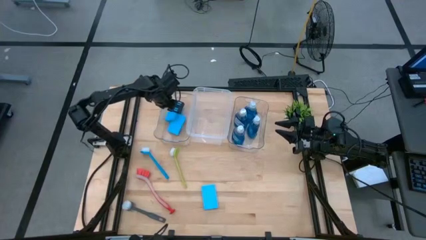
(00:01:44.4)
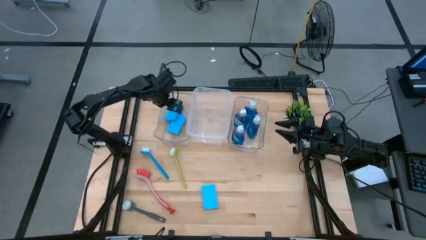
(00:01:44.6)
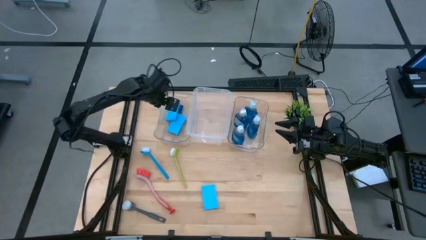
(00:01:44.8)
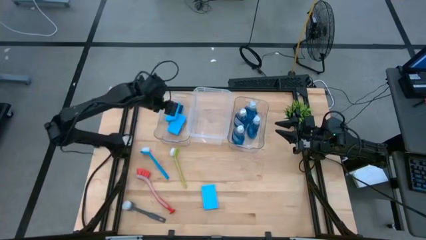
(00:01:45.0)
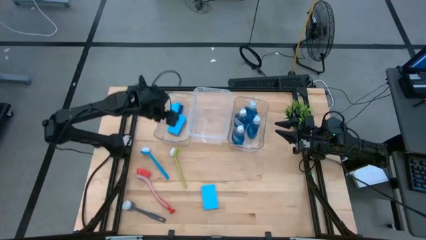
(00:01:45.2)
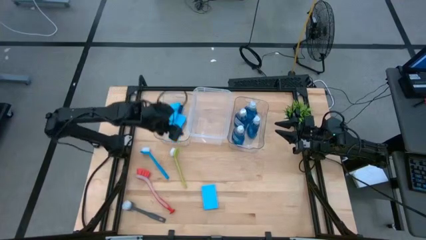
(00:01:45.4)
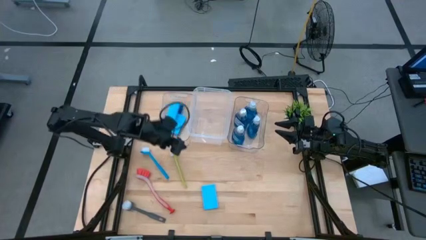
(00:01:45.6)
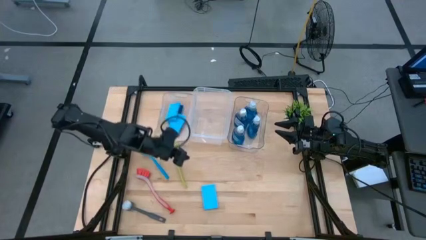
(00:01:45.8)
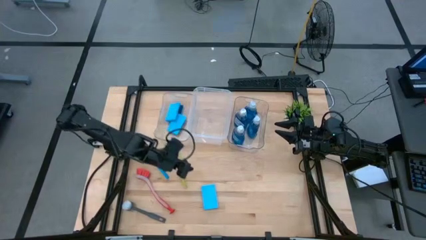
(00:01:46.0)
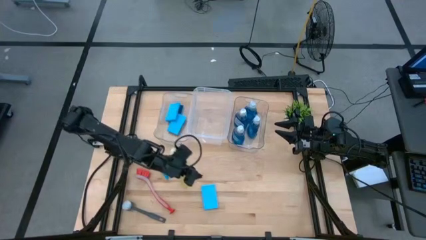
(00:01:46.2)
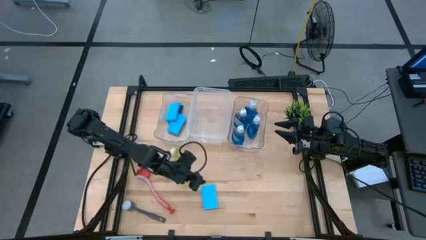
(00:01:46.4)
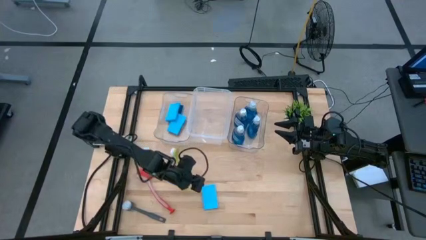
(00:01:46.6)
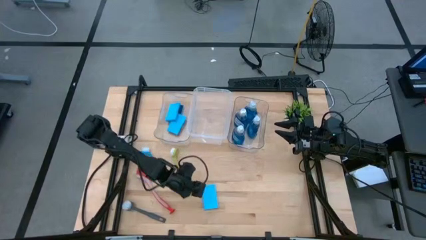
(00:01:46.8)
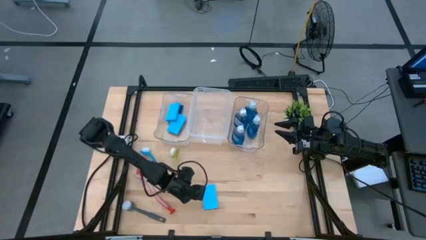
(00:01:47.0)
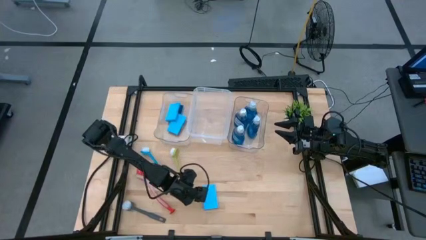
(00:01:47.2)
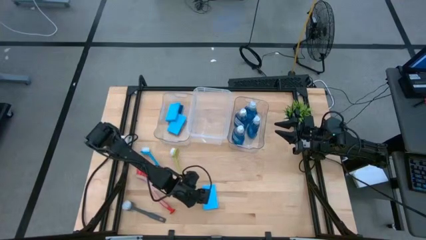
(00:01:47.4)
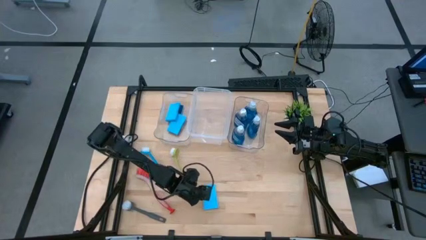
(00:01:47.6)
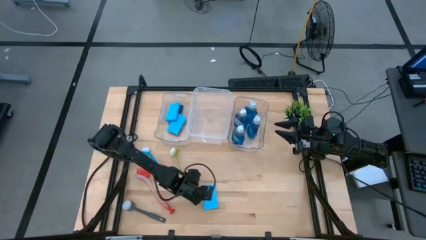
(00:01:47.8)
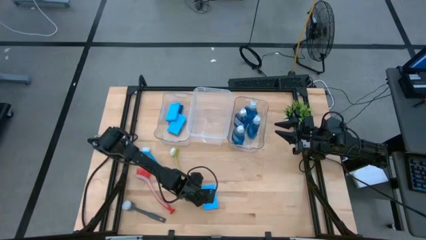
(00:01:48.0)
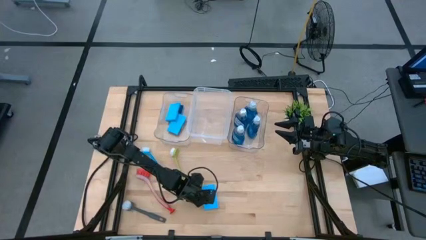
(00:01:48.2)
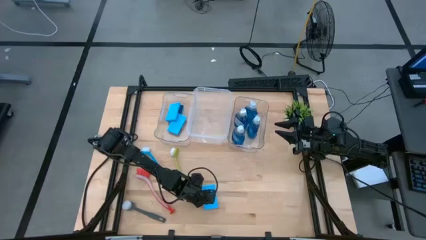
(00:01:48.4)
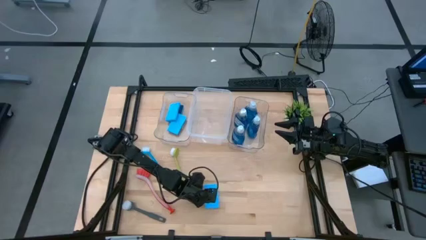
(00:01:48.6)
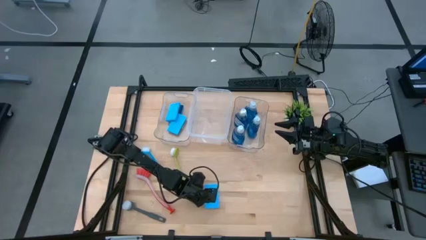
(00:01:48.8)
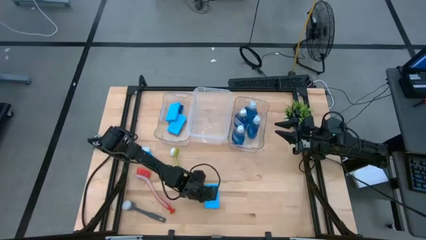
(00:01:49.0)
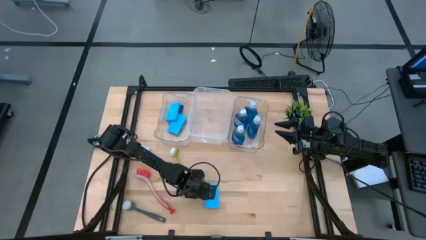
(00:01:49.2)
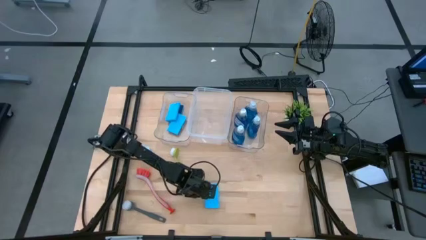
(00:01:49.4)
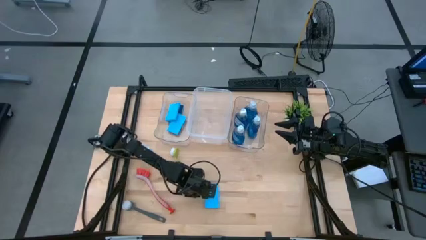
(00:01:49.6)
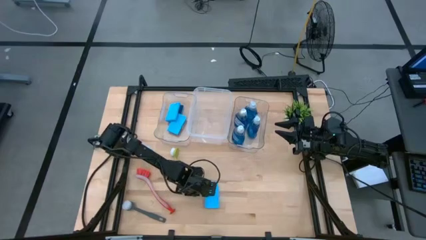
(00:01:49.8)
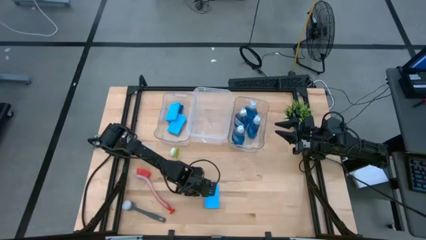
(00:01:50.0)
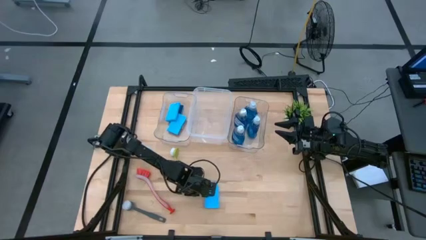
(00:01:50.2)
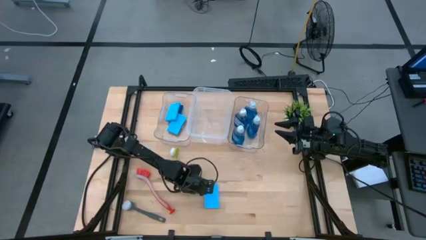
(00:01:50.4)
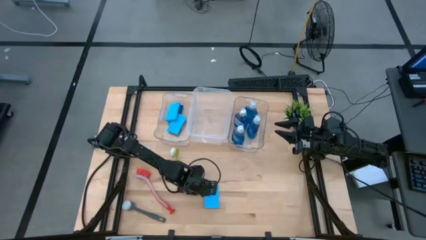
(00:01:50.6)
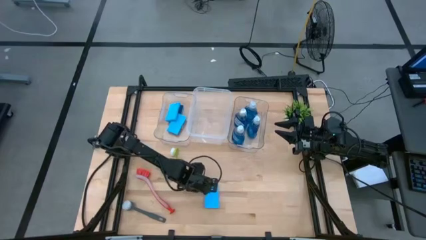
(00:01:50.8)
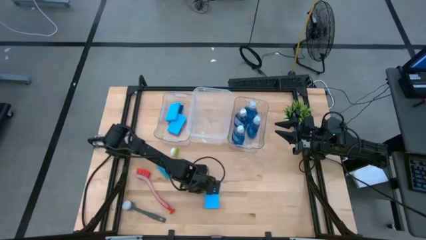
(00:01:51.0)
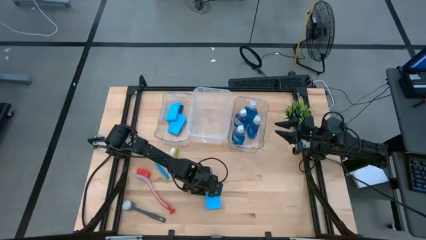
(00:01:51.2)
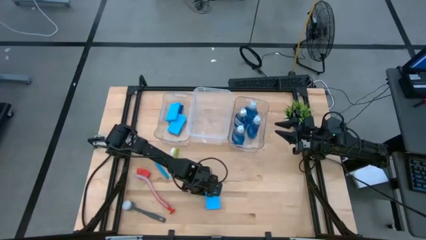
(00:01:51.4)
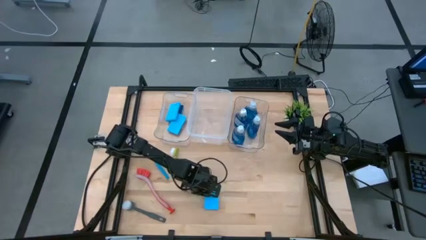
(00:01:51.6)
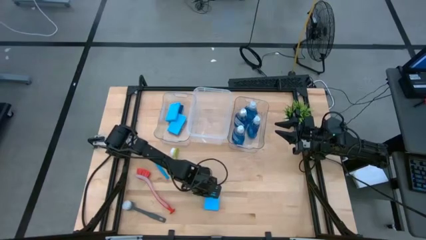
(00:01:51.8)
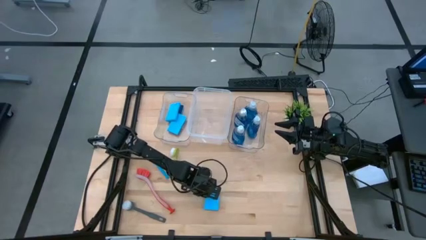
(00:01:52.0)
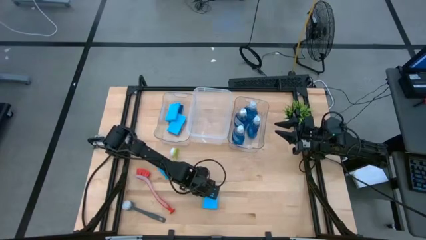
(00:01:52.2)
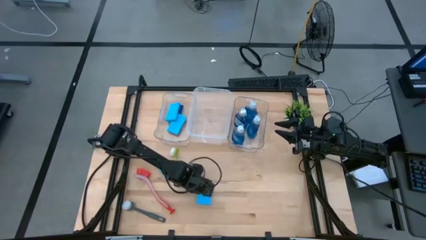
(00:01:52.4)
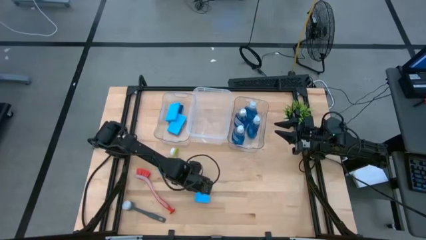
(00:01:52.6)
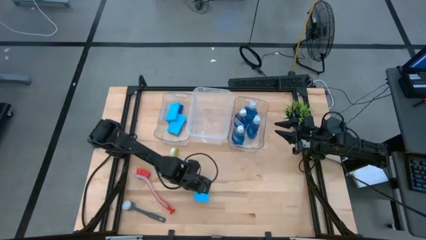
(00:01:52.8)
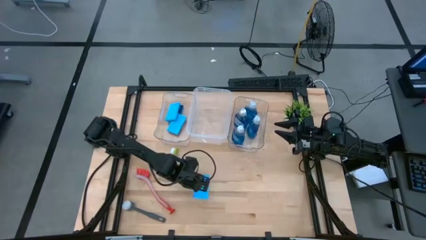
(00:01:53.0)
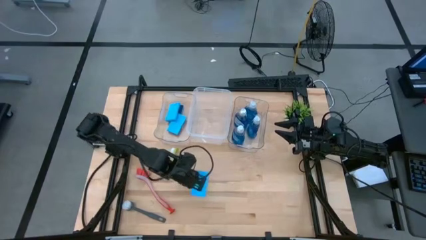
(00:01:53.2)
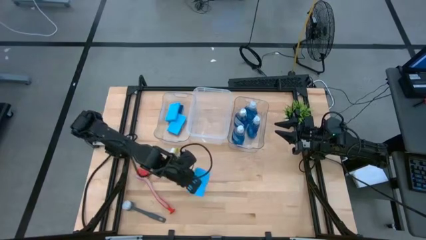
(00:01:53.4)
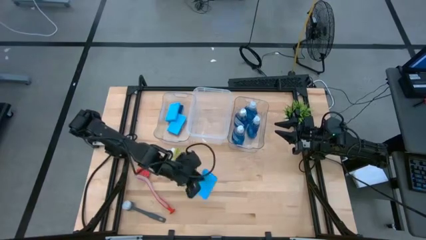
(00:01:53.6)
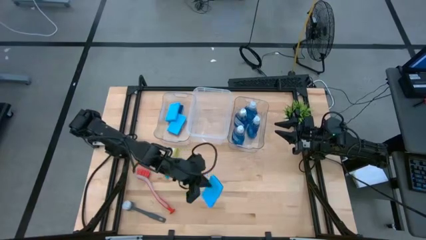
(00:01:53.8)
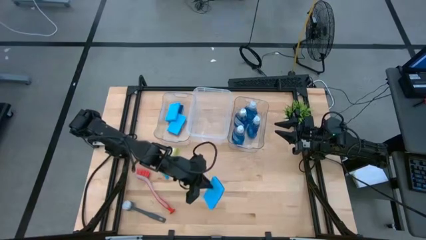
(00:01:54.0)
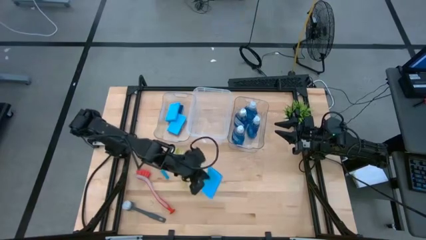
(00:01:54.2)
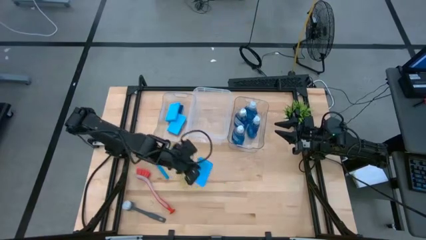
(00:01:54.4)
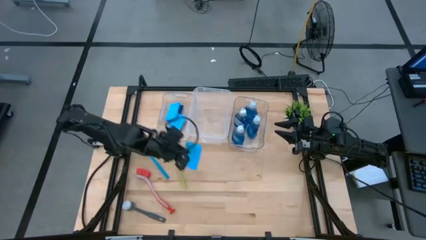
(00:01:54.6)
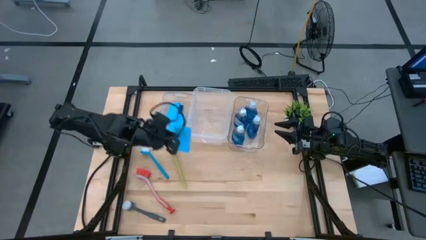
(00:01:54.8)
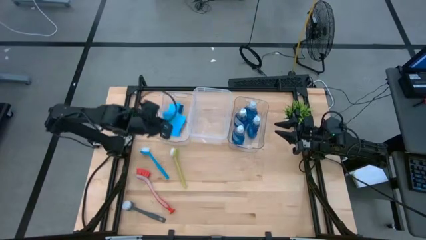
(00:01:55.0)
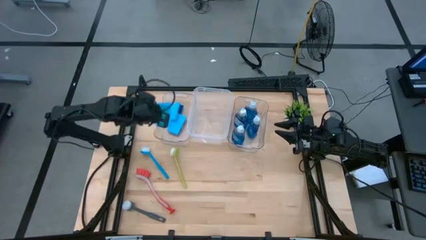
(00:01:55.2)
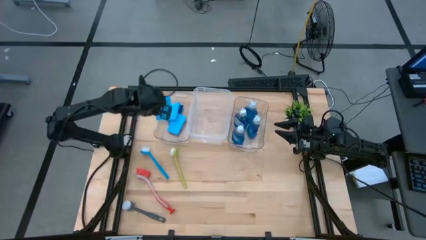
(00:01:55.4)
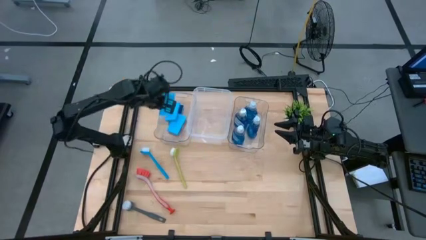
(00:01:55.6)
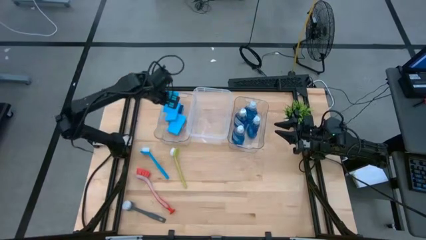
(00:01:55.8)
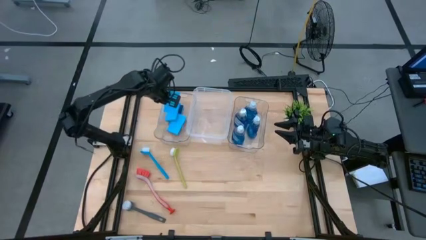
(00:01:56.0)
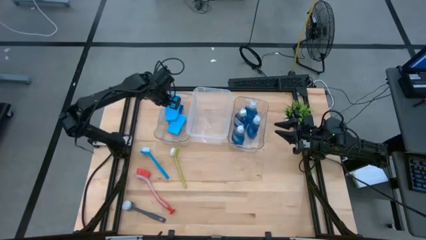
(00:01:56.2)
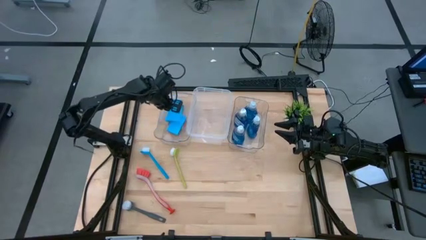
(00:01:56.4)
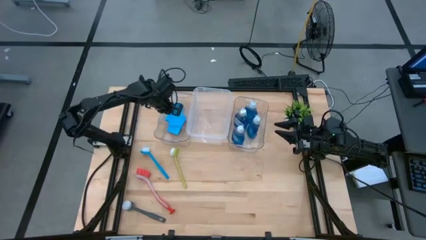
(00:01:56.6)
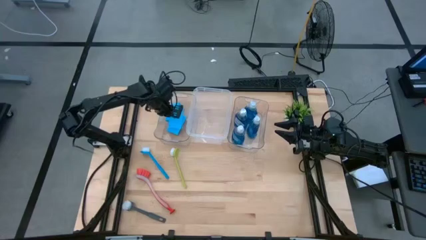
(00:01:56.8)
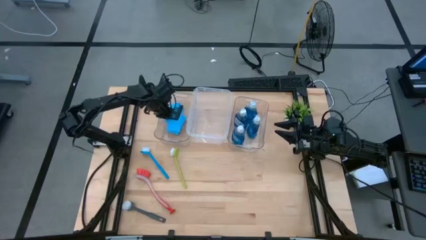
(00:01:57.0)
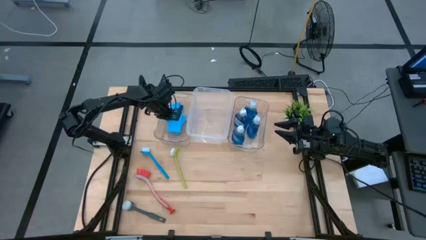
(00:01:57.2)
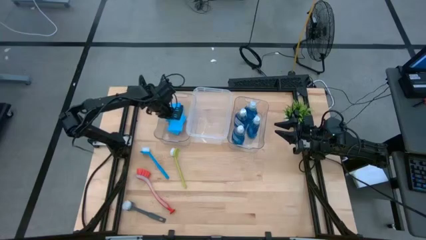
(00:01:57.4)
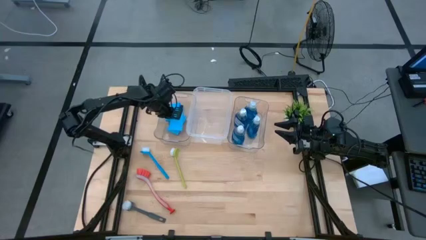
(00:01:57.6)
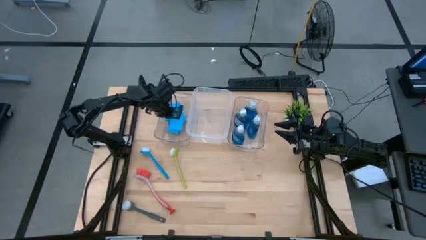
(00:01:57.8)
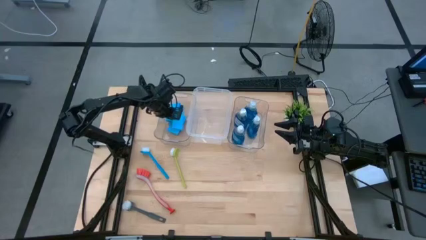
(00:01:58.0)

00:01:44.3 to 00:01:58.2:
Task: Pick & Place Kitchen Sink Supplies
Put the blue sponge into the left transparent bin
